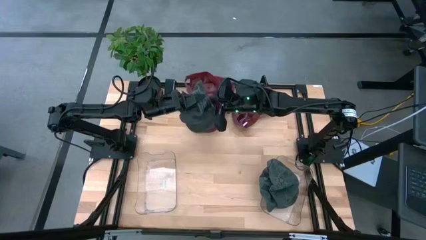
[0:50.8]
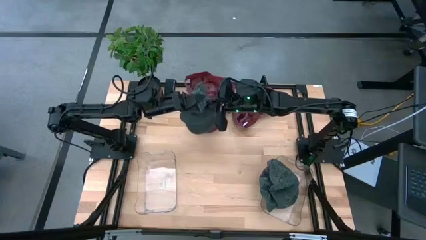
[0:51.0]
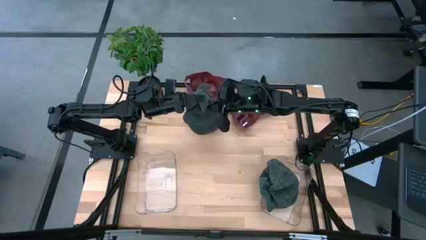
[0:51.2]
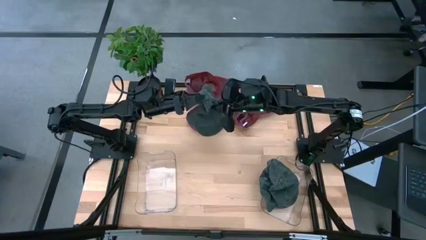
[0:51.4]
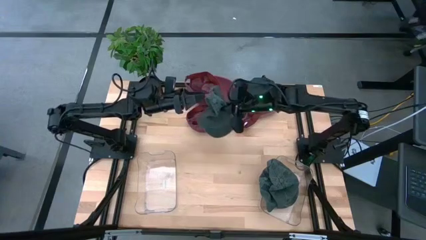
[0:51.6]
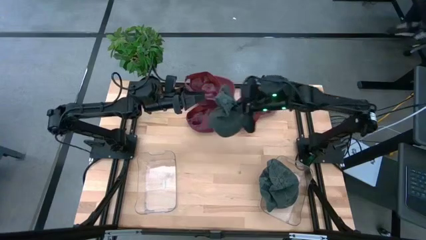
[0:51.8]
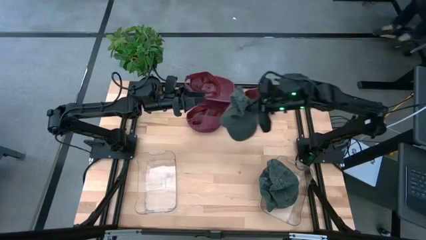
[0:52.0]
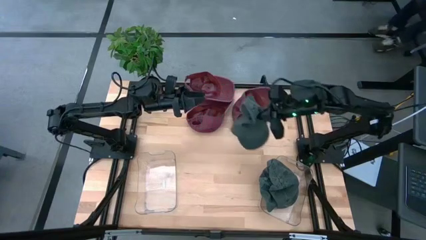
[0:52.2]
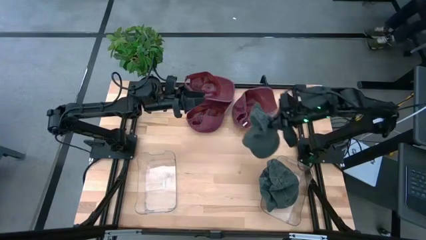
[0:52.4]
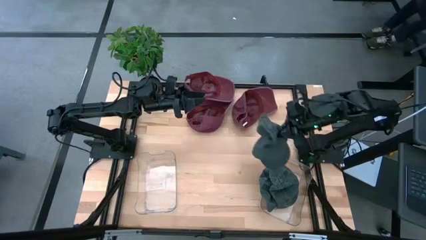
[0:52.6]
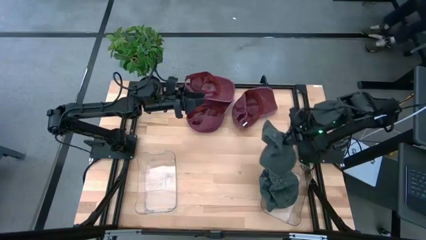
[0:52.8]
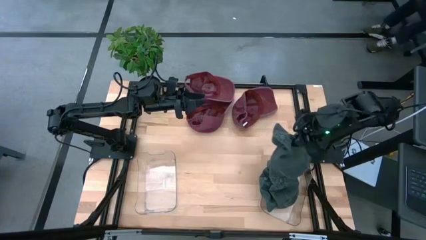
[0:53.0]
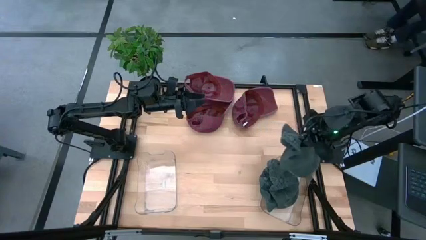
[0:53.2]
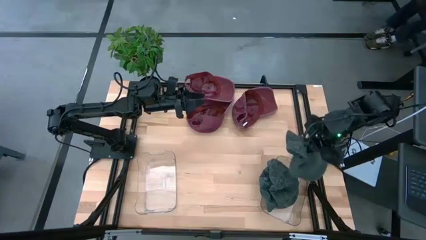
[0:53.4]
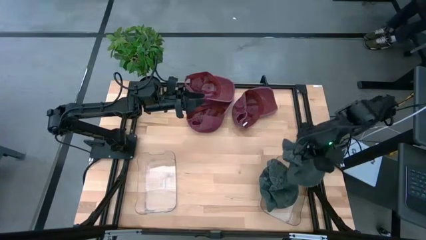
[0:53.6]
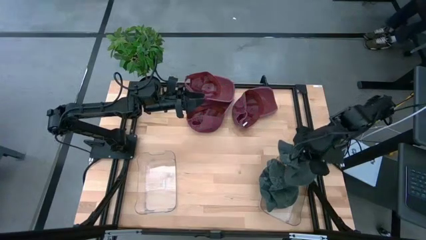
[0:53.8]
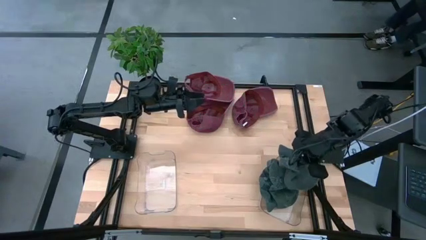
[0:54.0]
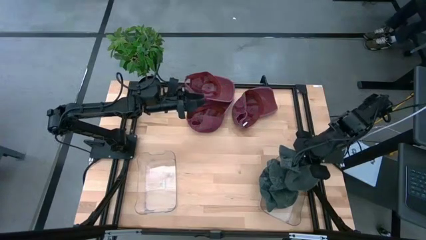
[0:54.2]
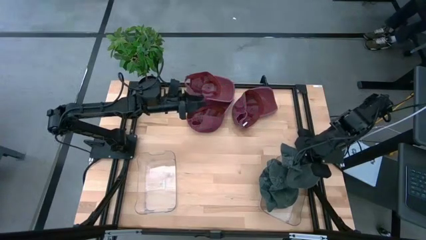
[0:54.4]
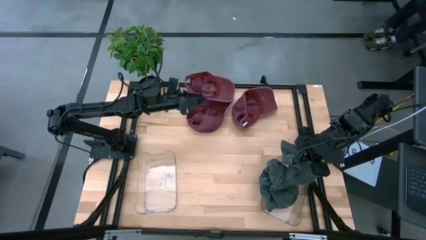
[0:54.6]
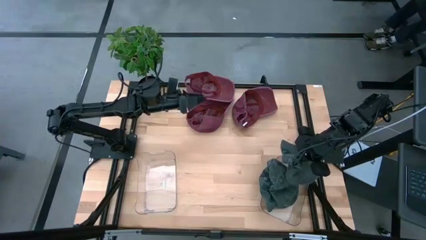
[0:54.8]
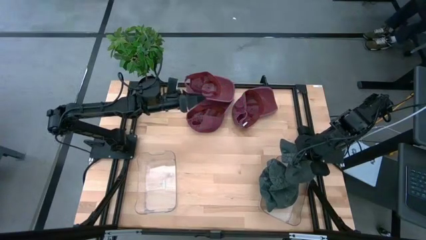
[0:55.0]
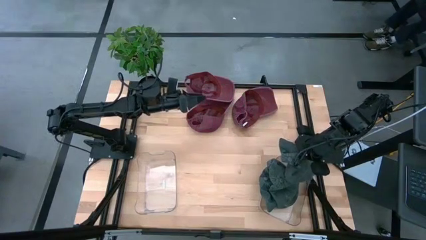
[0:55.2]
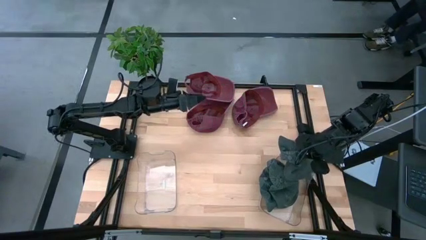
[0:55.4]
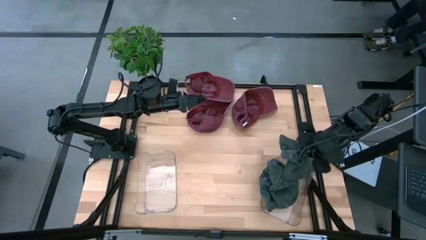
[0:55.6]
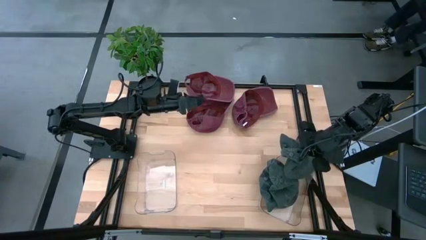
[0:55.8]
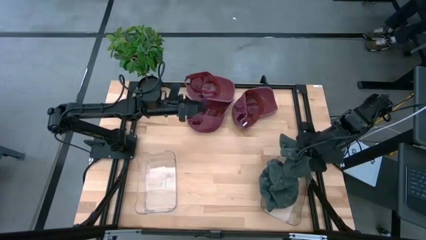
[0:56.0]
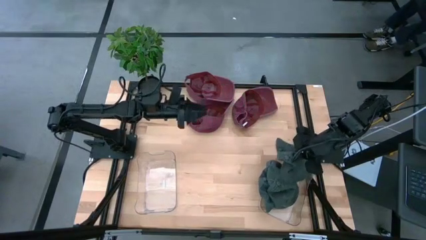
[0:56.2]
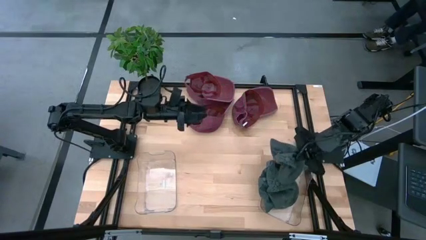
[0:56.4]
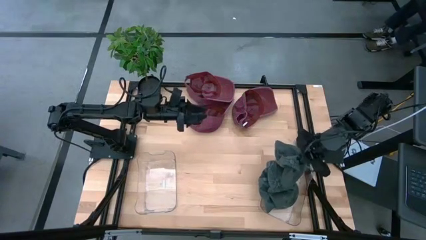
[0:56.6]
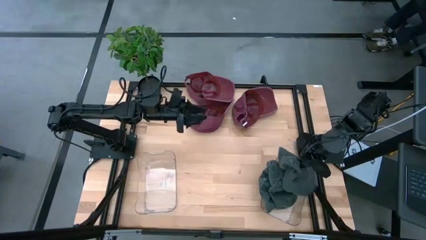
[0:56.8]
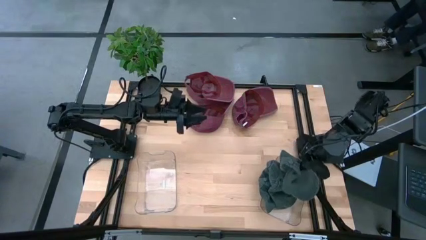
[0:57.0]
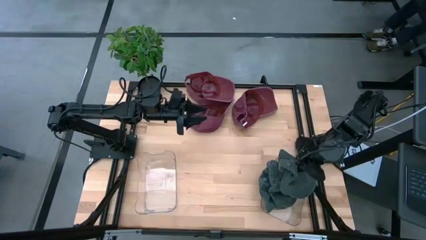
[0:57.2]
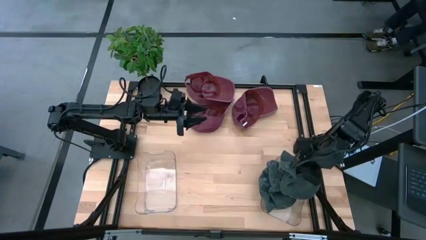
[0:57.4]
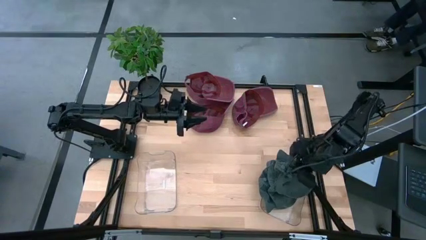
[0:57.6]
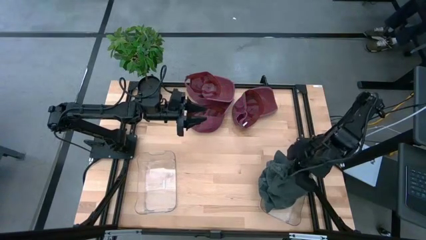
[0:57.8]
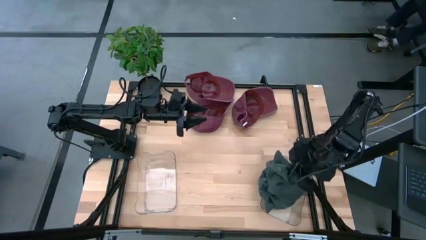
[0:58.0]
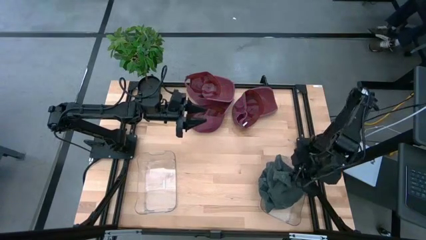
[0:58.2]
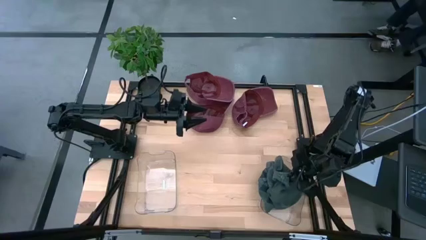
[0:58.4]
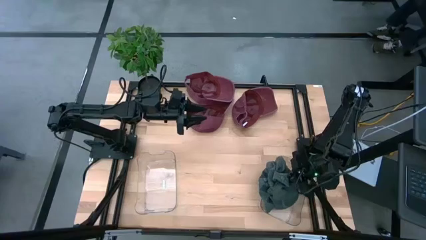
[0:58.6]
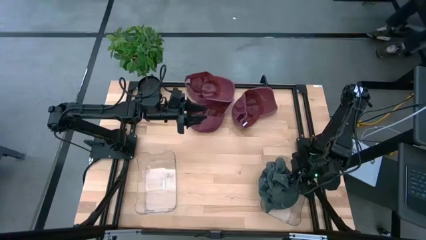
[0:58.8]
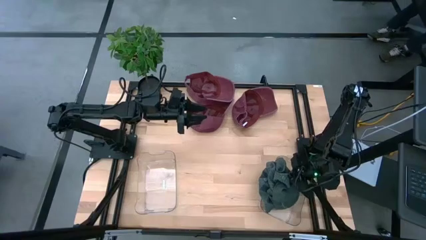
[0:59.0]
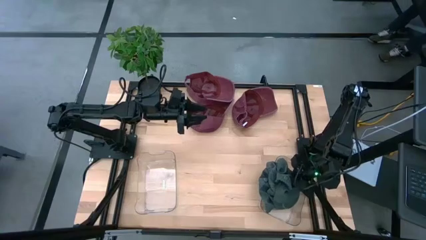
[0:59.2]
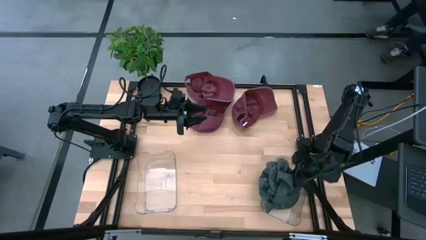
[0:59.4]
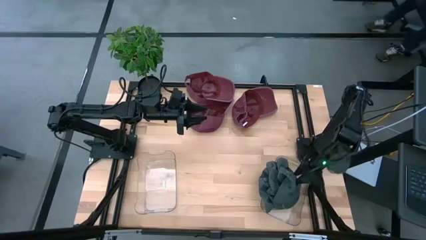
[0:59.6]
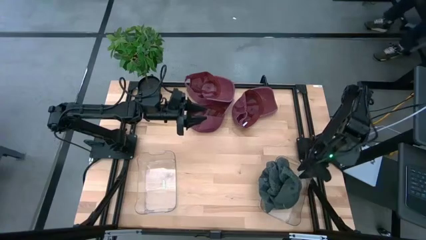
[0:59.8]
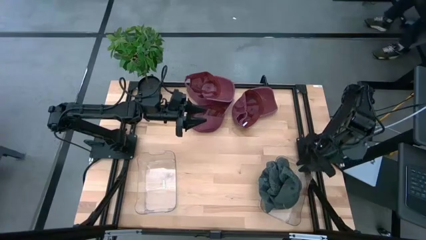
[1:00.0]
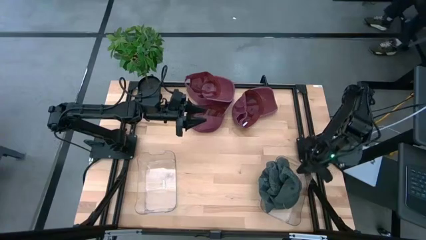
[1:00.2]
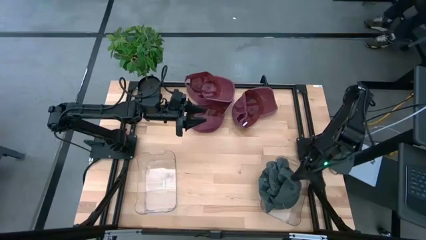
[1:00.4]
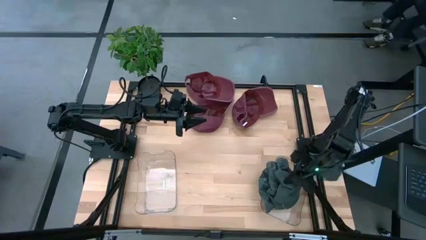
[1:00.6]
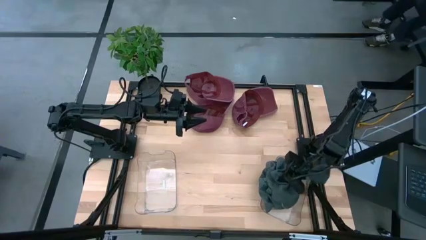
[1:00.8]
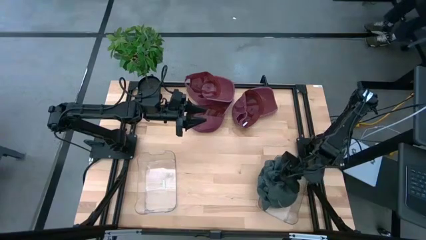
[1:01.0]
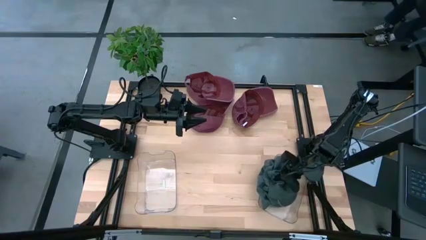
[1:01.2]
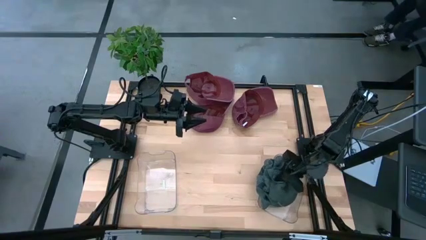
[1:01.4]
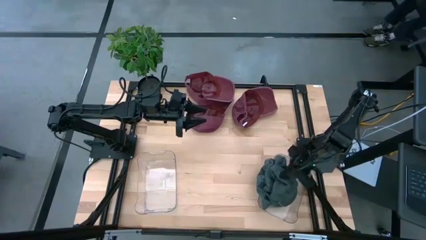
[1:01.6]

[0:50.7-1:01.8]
Task: Pick & Place hat
Put the gray cap into the right transparent bin
